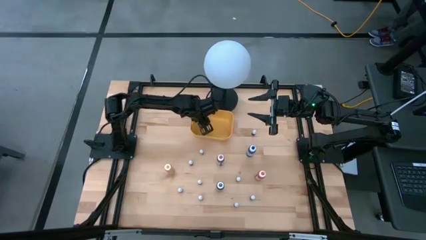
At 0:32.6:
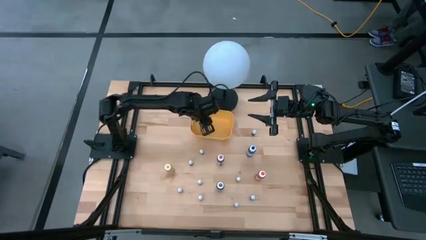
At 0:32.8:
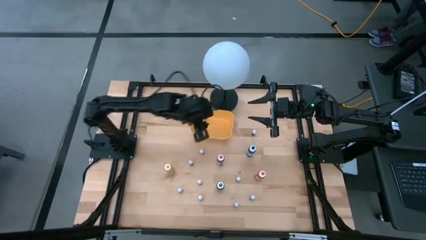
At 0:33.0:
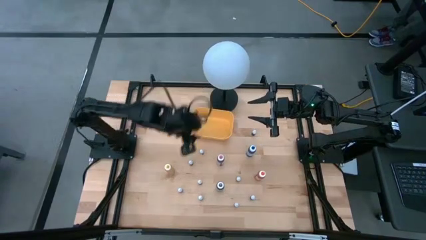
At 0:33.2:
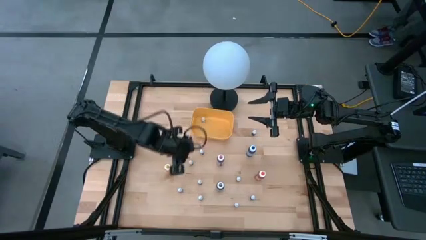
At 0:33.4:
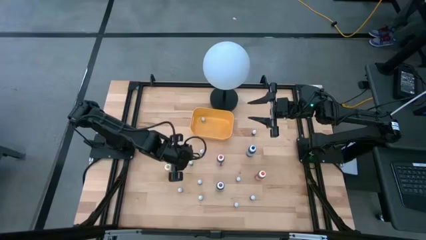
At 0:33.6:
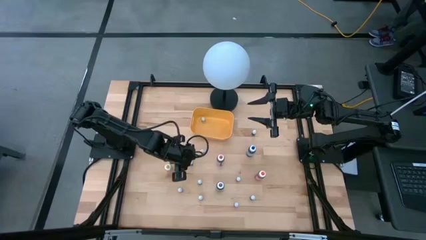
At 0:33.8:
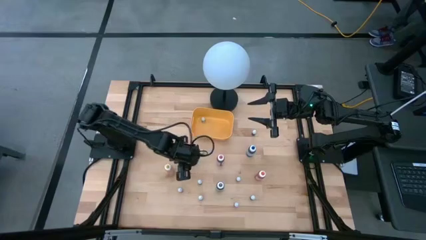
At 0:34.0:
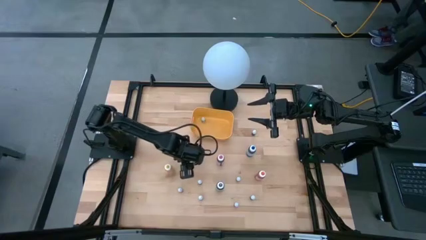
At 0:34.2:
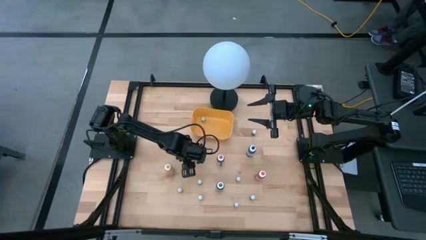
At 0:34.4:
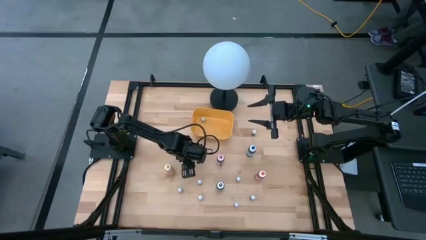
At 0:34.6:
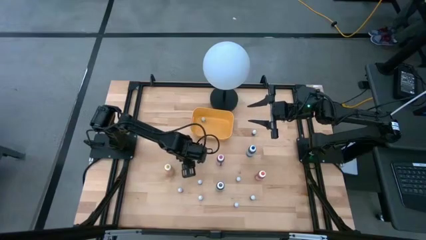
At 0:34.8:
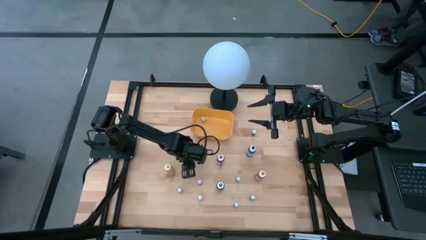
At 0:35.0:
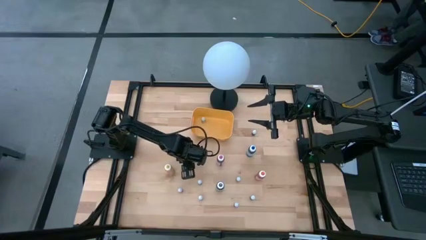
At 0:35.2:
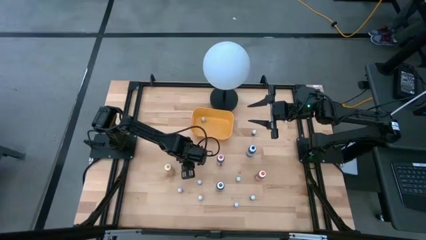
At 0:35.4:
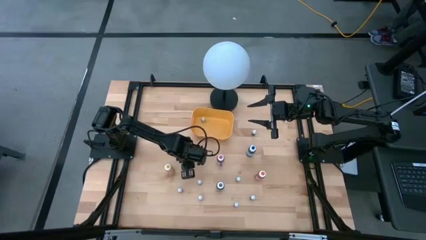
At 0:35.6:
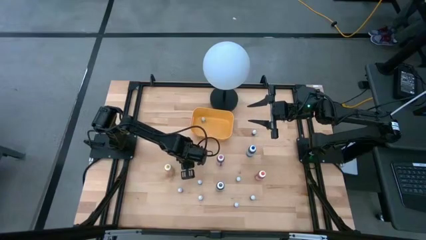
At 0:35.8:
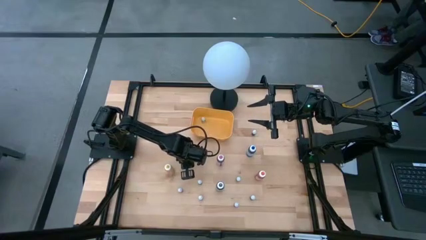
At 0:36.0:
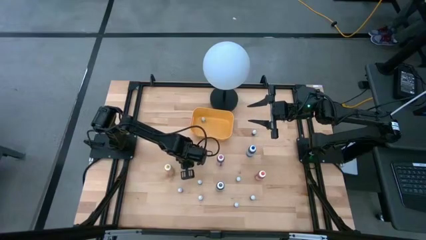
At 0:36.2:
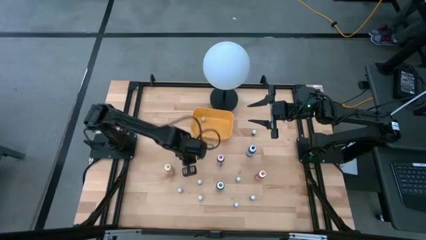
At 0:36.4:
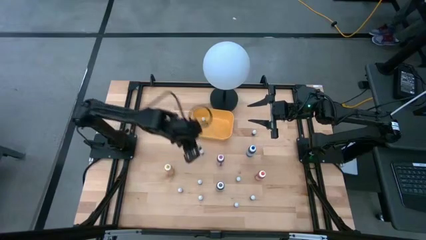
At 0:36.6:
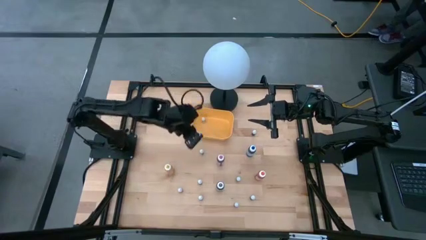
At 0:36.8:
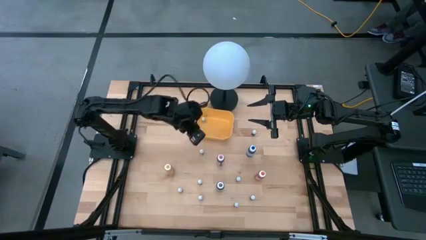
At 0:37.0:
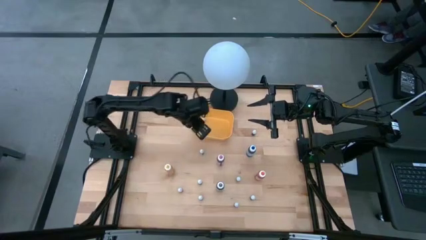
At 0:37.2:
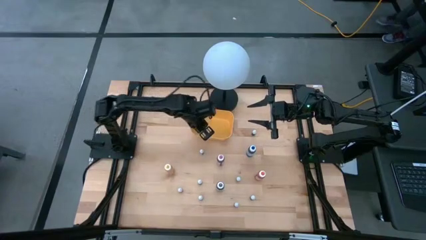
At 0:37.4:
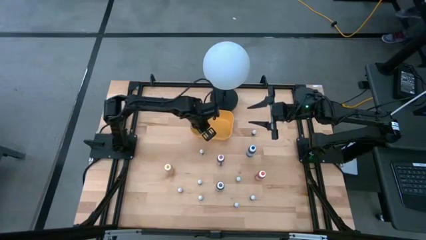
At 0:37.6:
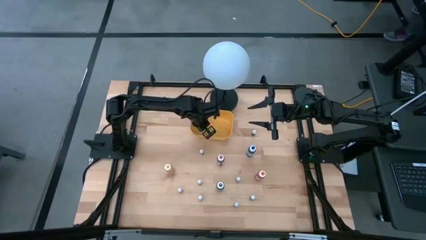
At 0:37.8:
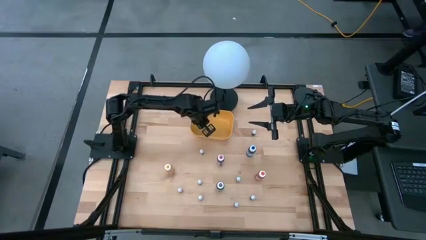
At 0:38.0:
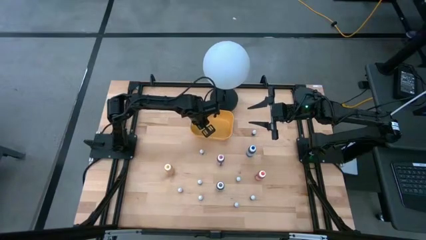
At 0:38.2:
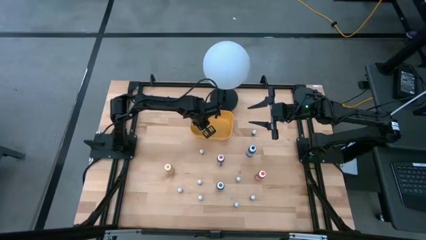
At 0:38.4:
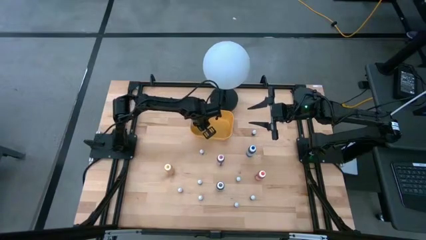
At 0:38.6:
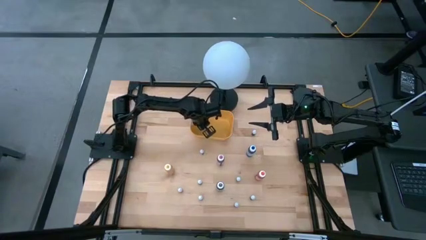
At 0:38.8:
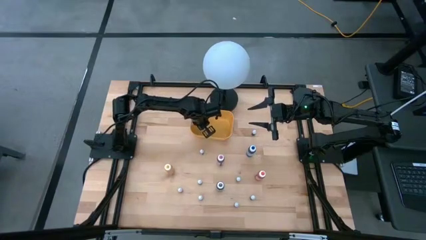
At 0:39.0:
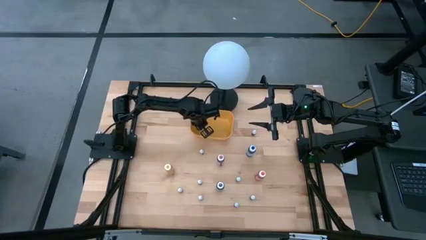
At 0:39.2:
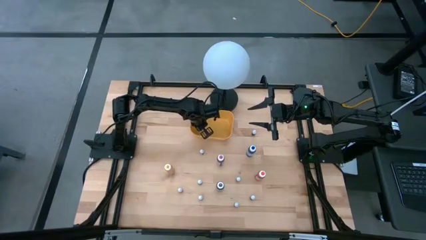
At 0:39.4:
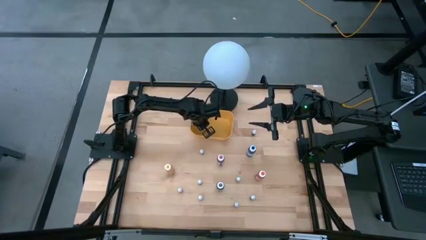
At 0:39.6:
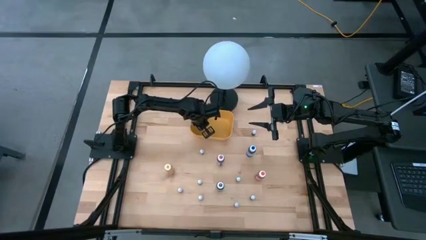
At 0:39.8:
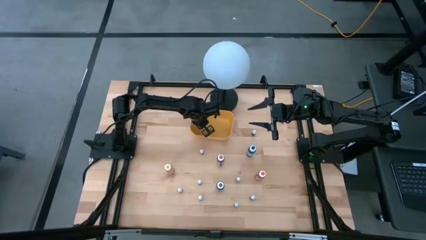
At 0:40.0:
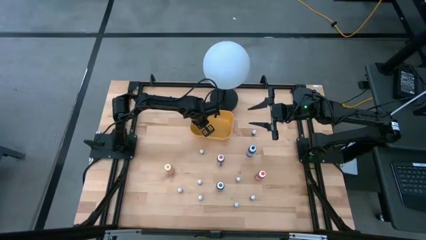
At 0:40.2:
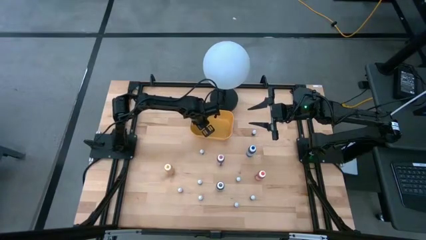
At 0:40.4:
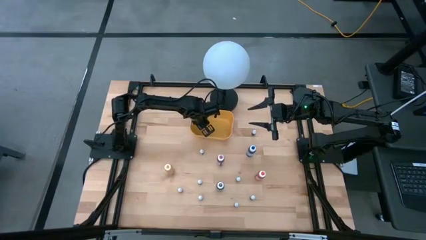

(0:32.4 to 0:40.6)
Task: Pick & Place food coloring
Put the left small green food coloring bottle into the yellow bin

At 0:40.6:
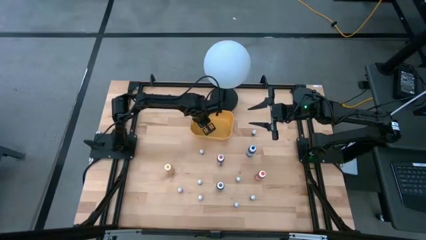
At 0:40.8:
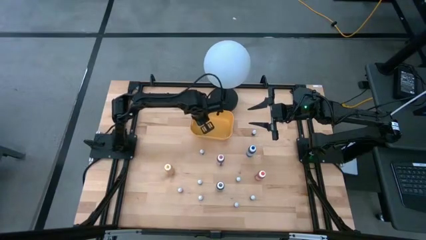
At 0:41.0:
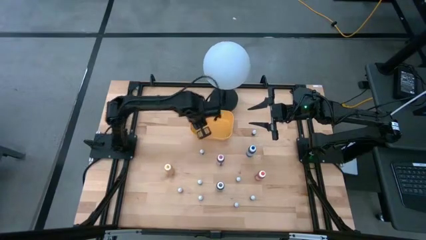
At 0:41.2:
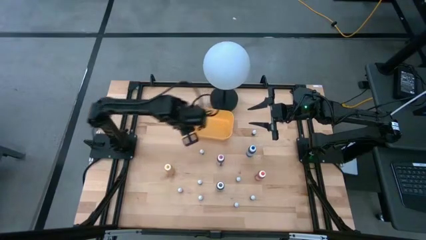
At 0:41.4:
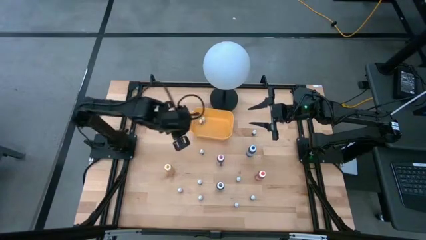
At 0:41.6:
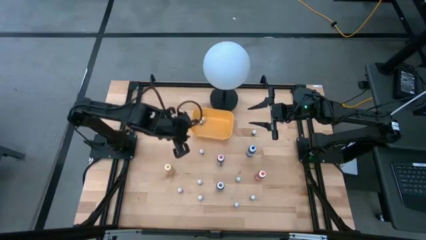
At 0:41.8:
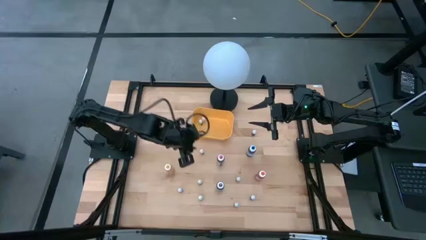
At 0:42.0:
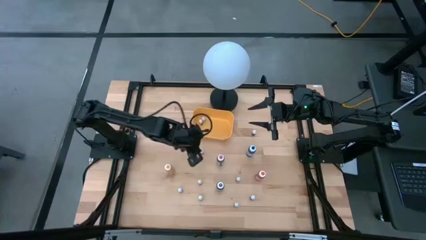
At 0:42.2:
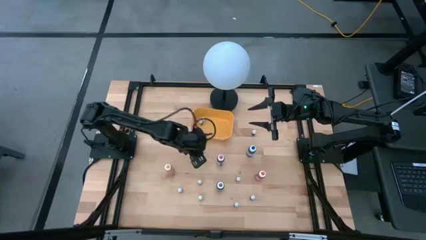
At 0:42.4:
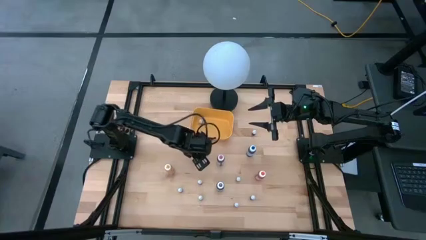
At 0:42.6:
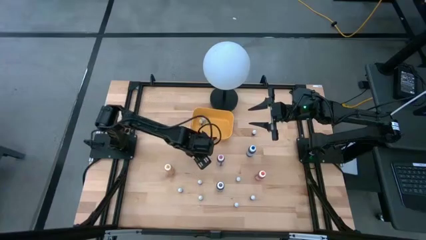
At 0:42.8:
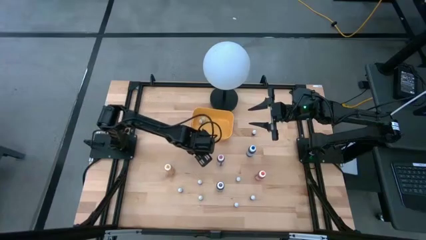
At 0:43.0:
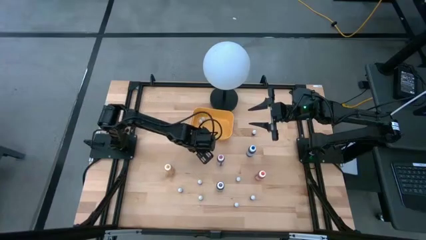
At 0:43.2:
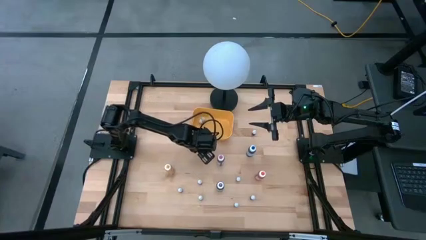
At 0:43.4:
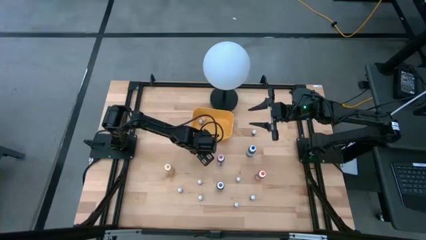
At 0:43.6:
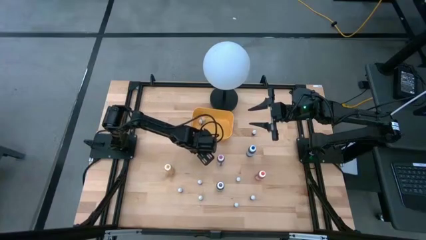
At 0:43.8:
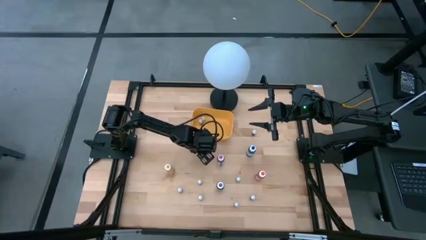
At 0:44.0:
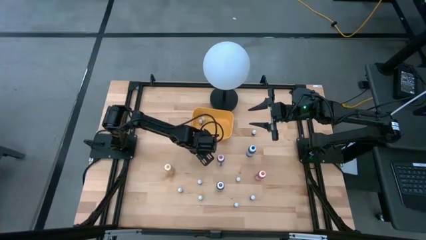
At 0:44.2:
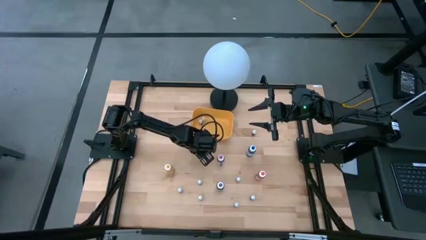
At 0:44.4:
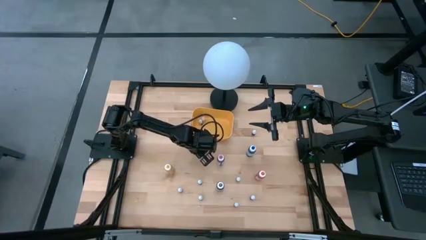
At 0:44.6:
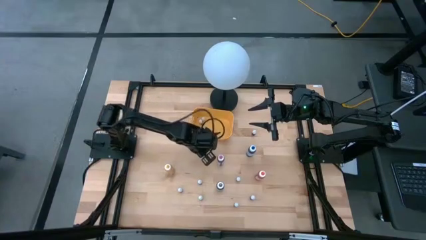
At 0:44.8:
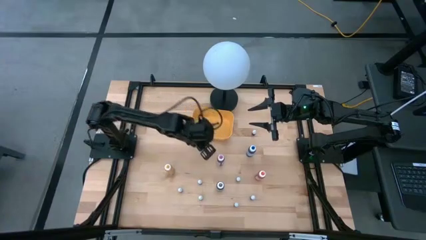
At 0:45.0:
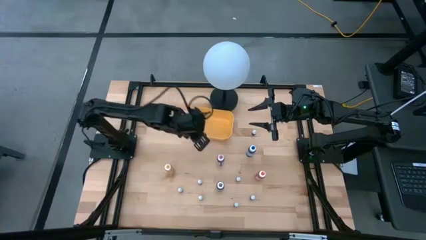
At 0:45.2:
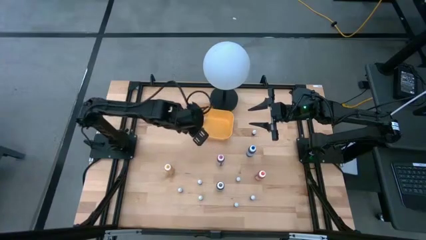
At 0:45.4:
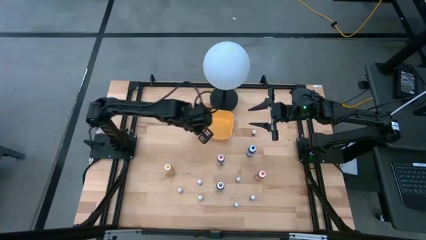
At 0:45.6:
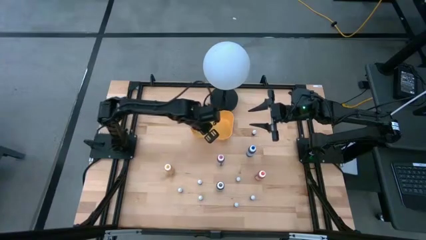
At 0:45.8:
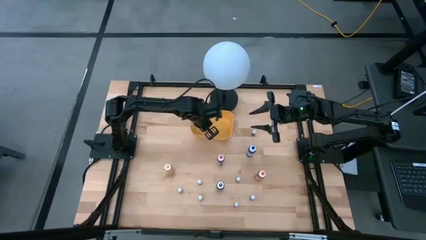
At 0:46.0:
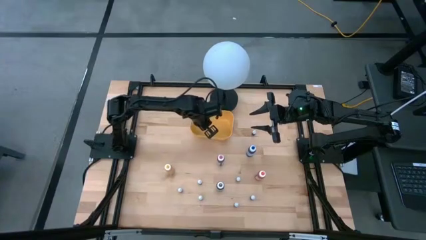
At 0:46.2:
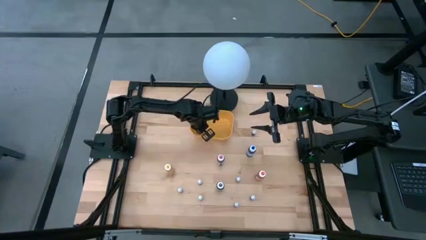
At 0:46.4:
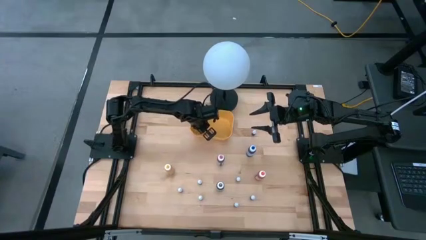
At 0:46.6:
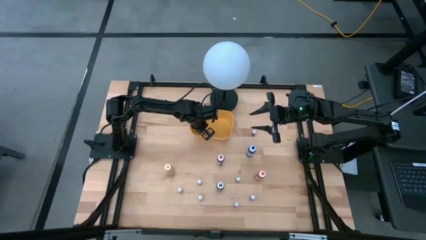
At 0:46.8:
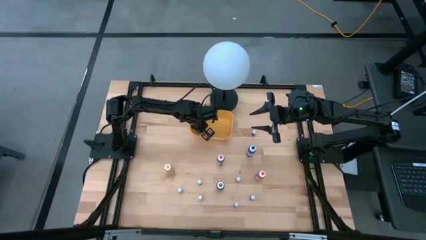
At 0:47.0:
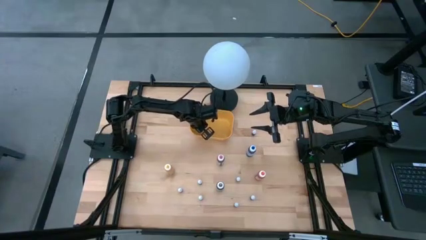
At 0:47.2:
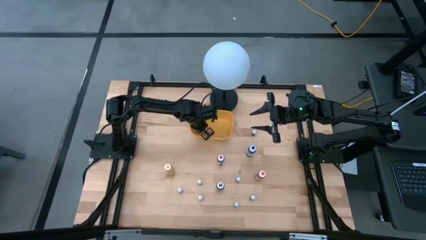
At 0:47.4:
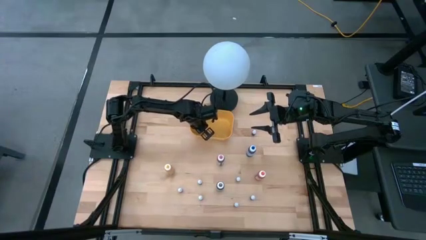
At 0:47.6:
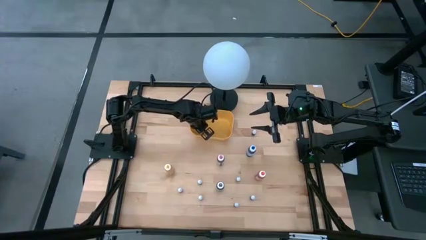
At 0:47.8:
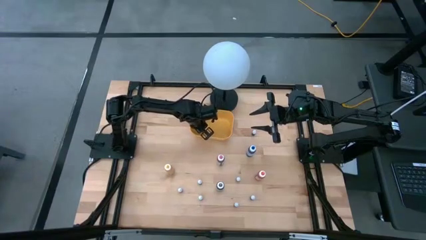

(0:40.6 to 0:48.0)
Put the small purple food coloring bottle into the yellow bin
